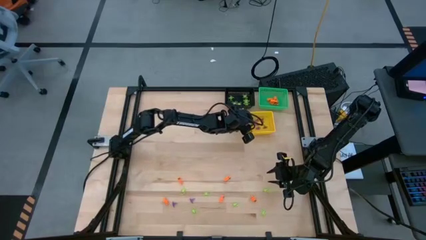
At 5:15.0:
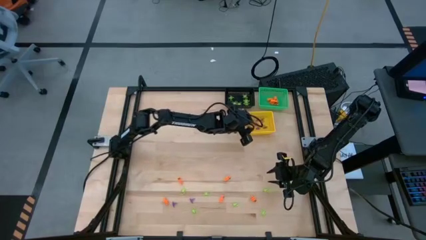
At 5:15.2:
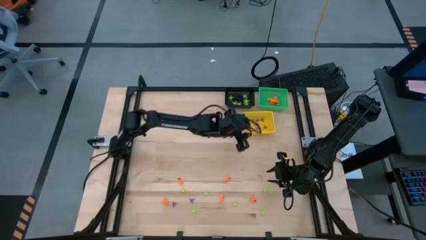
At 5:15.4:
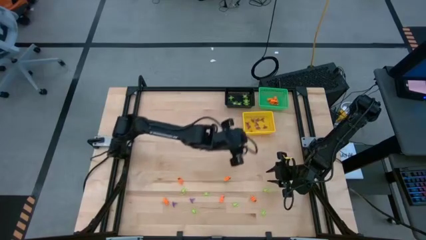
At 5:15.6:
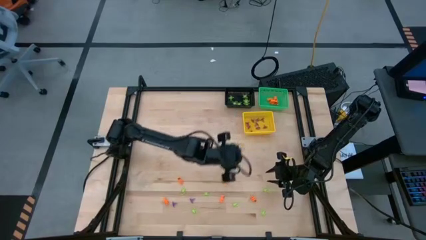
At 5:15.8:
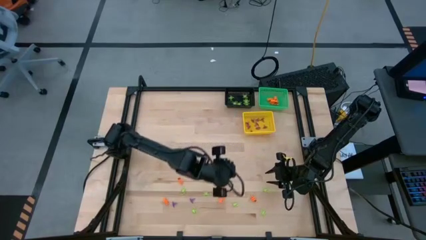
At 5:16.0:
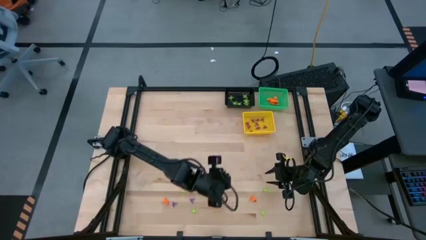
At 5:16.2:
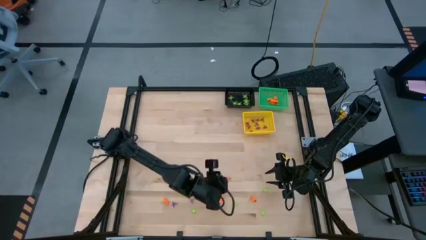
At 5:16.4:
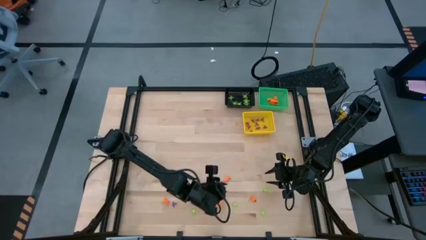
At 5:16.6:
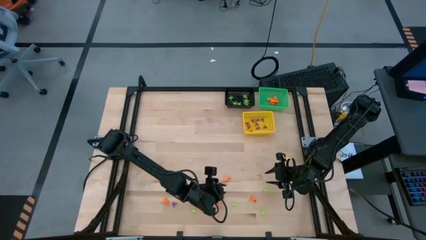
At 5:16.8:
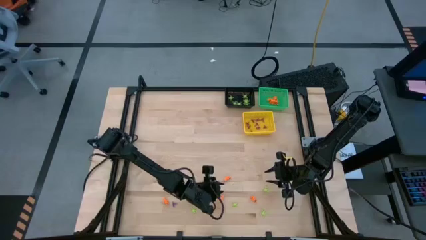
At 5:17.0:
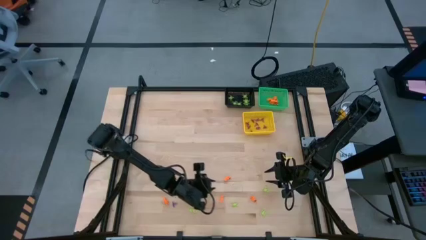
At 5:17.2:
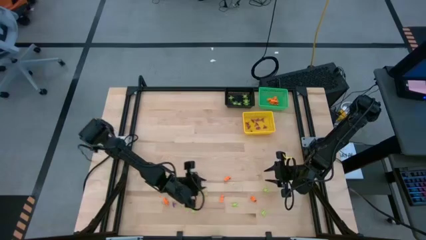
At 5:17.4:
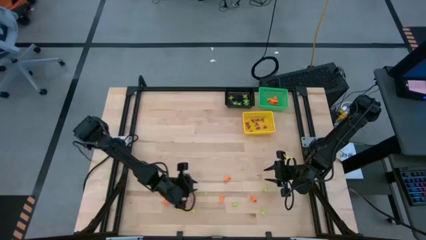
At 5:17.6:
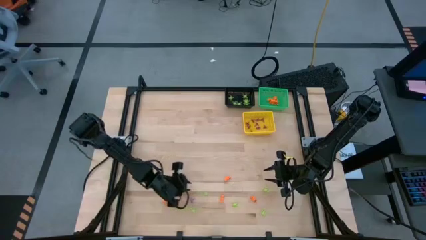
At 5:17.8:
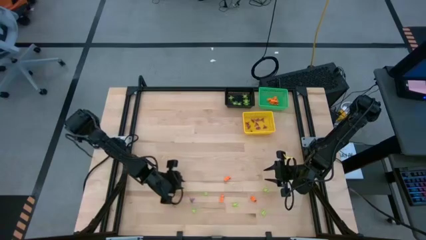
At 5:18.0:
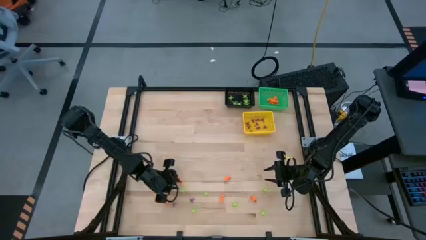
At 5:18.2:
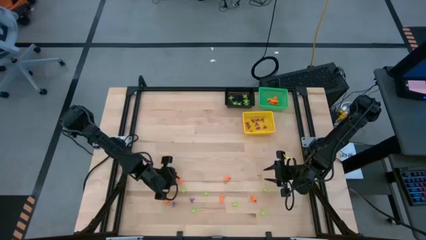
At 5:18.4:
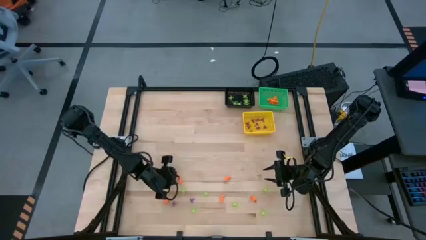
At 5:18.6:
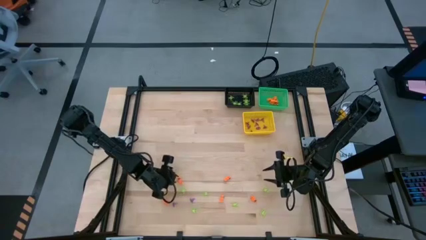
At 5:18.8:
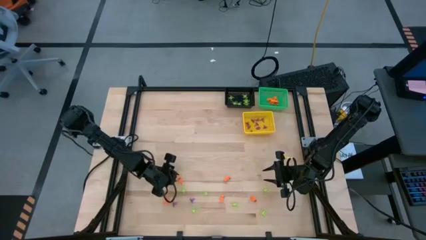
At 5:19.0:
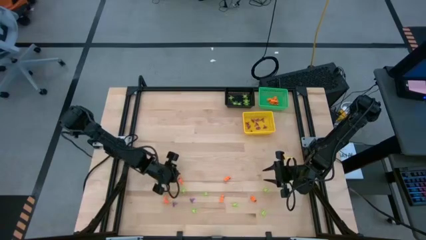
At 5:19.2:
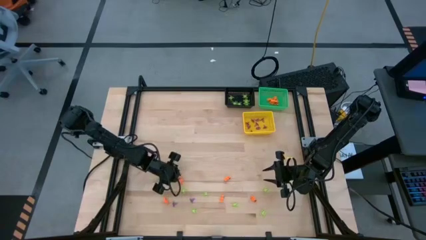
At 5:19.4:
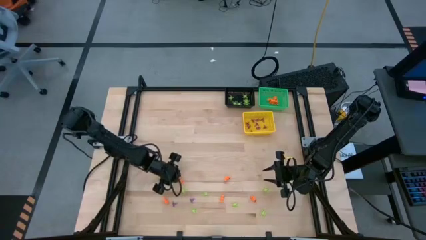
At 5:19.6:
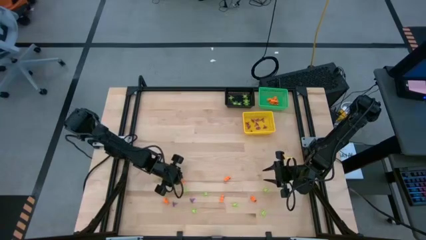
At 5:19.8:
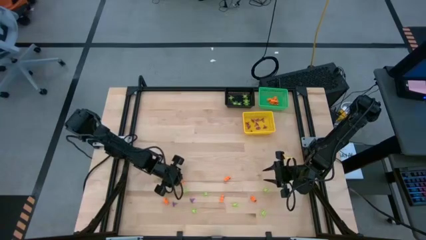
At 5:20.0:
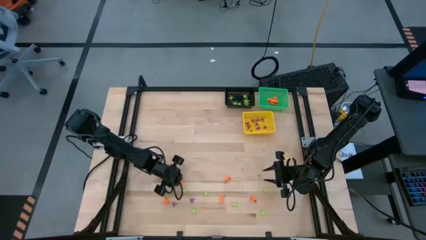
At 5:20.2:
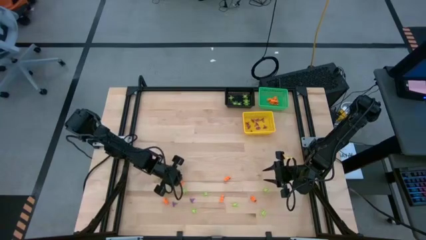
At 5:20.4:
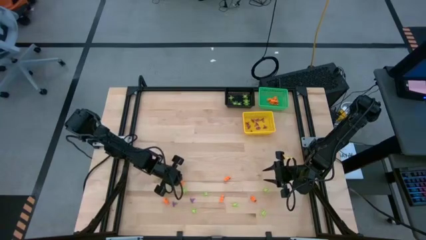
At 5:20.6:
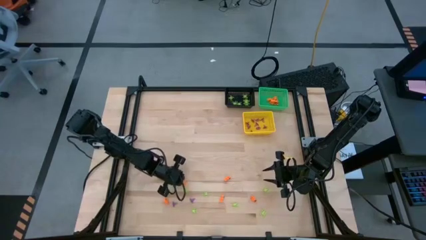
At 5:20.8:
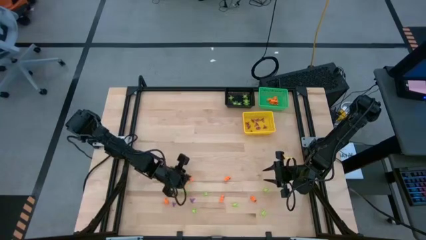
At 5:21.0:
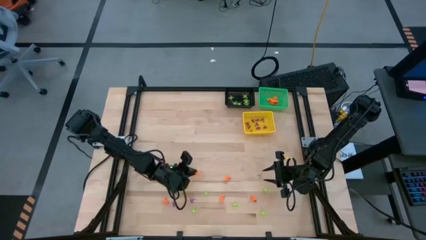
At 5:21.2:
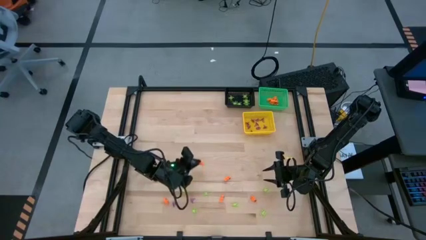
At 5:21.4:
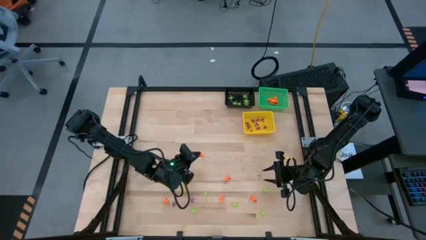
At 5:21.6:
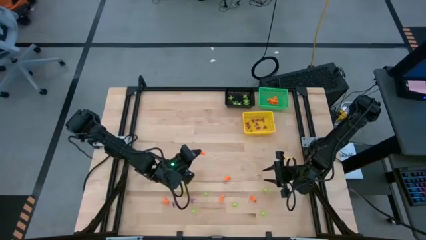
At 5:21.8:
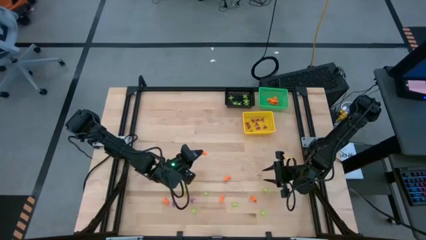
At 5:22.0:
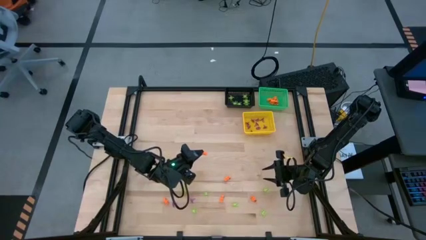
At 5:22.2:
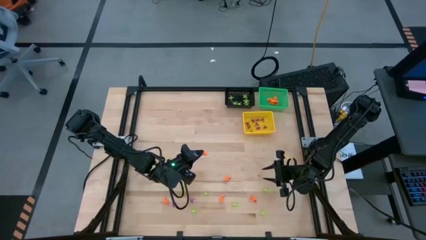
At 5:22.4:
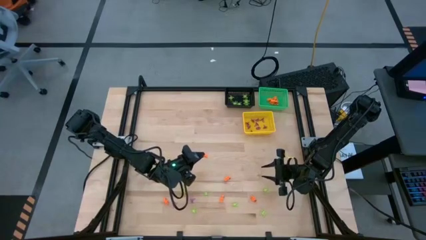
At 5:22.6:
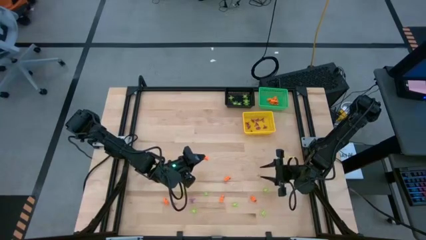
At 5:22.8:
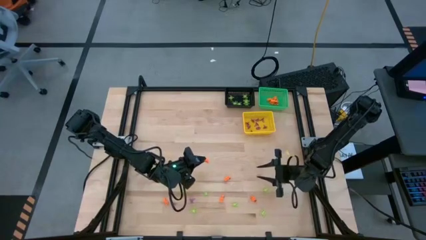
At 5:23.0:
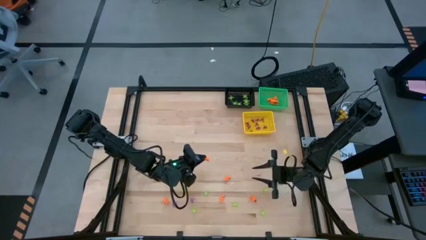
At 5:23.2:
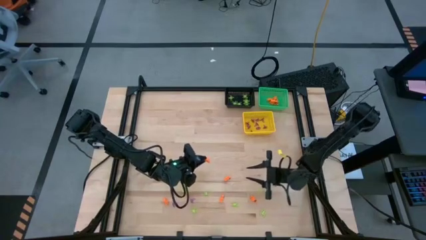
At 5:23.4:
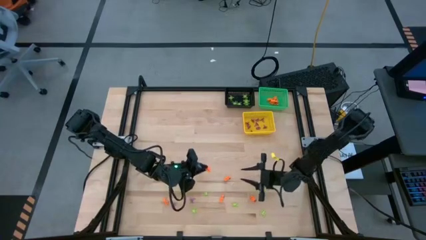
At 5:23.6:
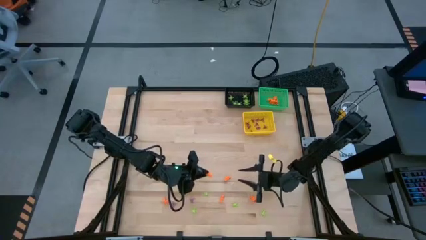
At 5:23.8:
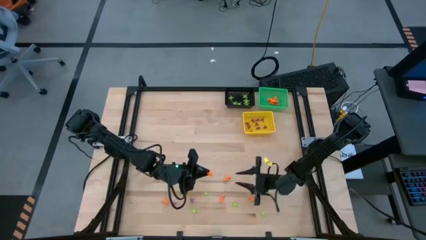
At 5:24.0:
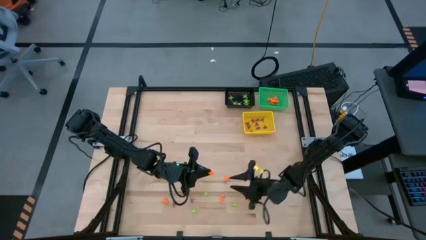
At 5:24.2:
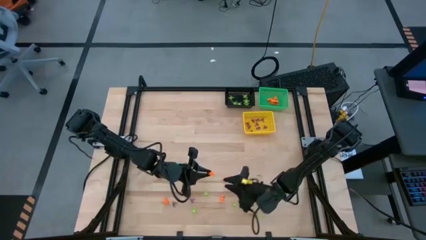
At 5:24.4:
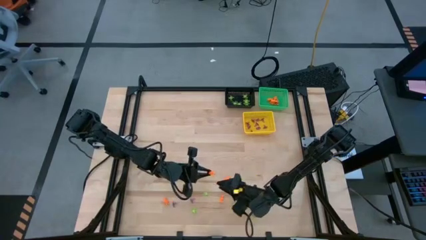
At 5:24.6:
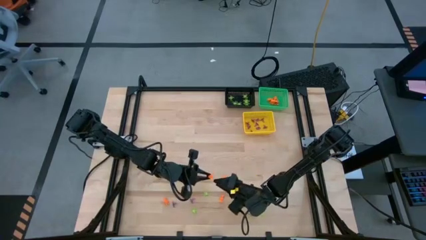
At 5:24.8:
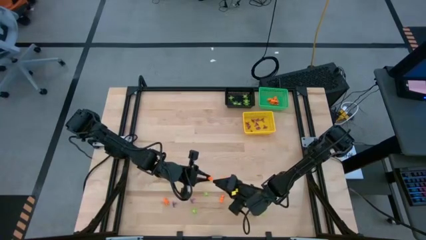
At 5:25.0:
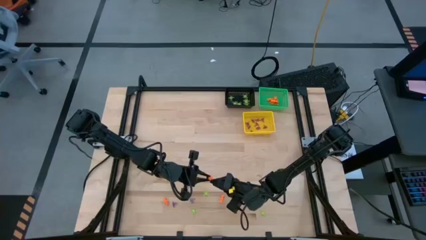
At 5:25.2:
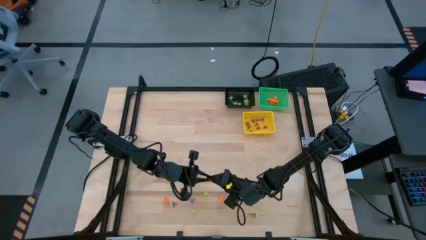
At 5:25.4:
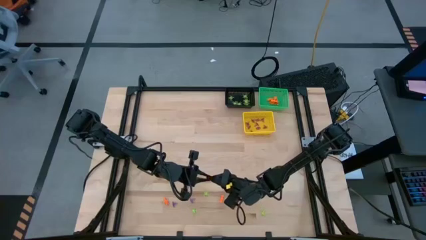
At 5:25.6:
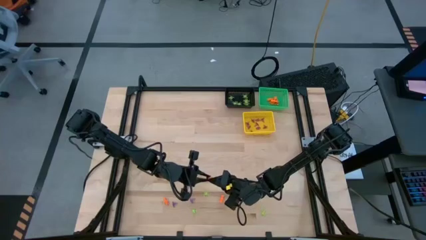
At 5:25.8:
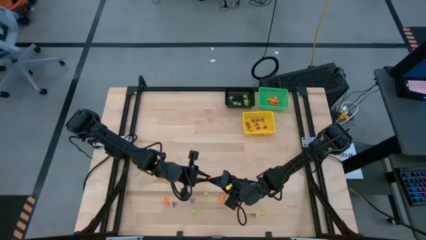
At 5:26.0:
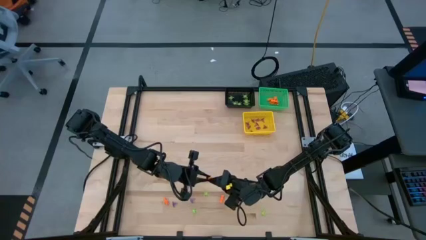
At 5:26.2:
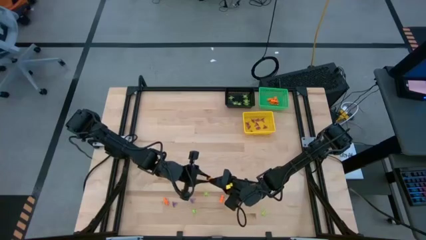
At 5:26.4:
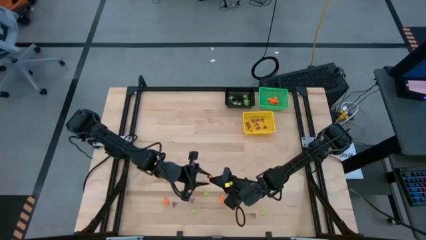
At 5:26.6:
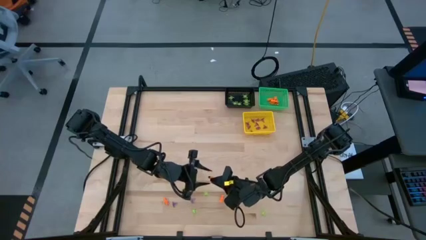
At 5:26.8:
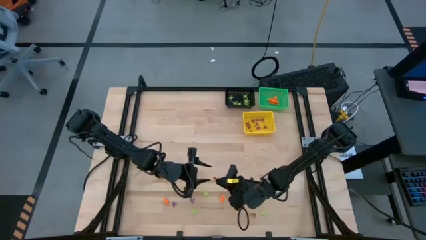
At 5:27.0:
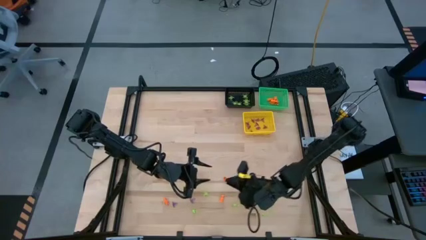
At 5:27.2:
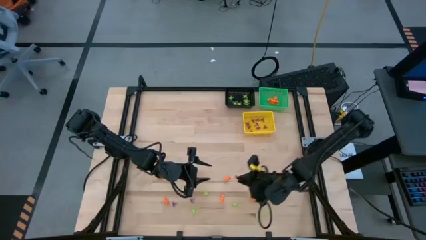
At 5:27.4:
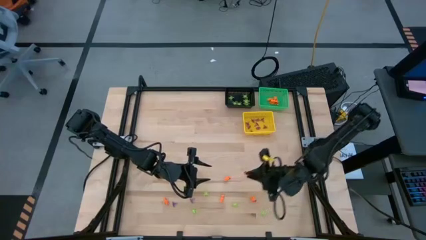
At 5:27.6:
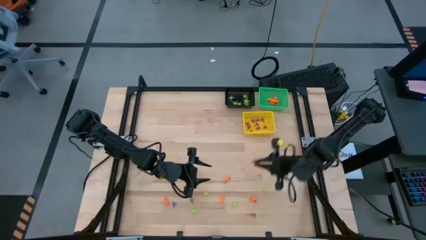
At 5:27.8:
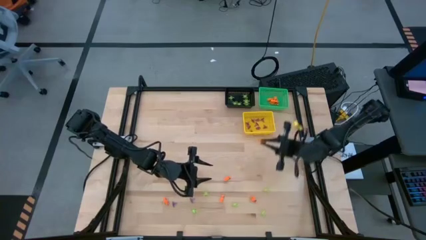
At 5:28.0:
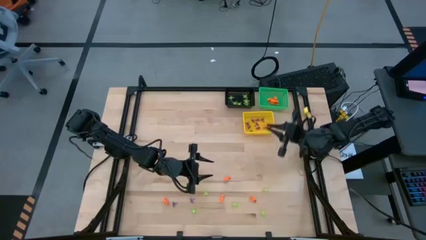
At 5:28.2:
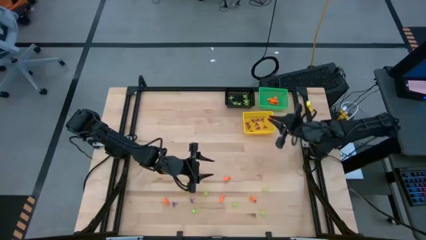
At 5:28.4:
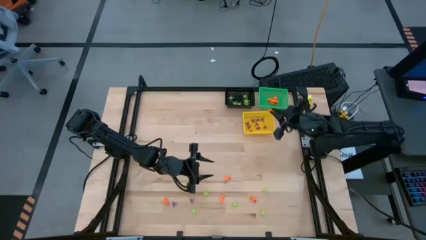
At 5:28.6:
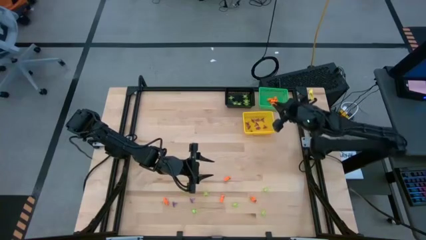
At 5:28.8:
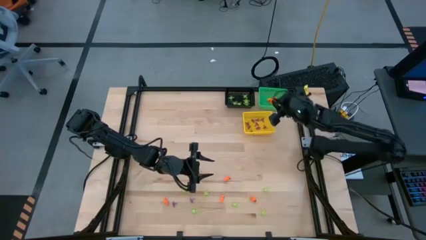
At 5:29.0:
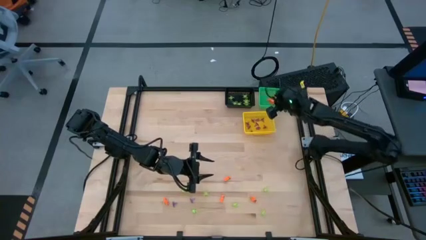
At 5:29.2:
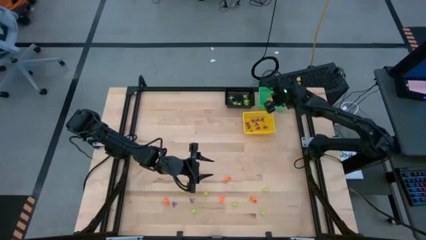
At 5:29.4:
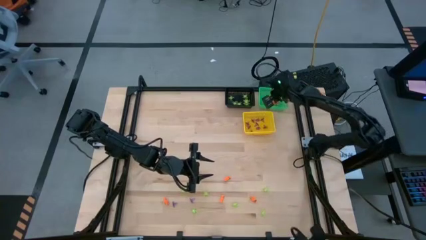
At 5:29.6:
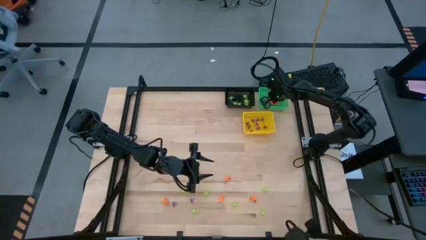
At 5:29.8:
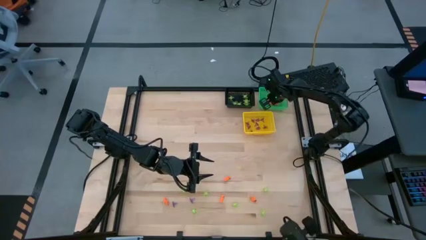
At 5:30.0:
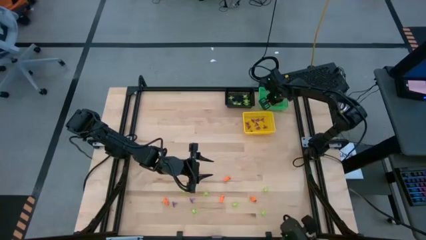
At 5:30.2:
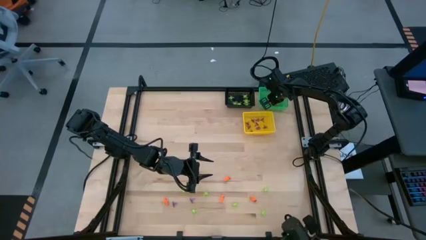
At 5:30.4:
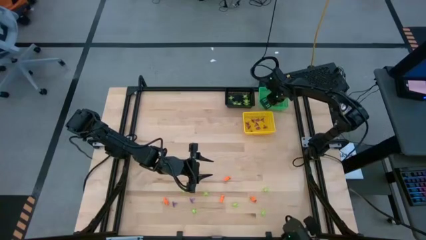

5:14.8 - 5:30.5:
Task: Sort Halloween decoration
Put the orange skeleton toy into the green basket

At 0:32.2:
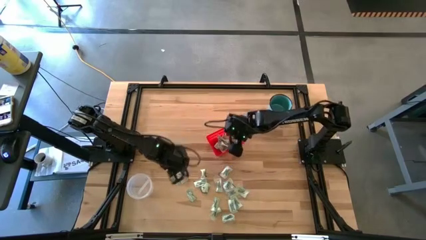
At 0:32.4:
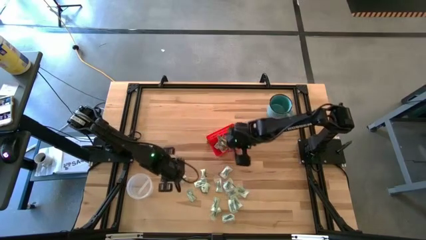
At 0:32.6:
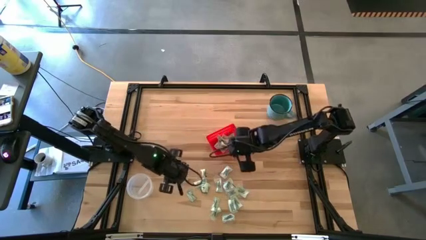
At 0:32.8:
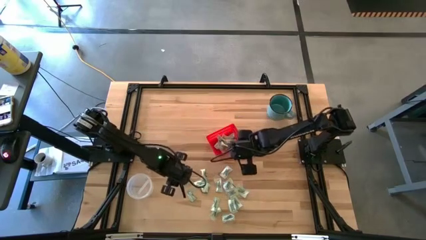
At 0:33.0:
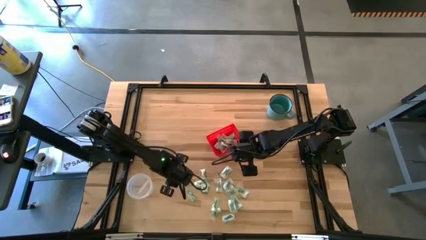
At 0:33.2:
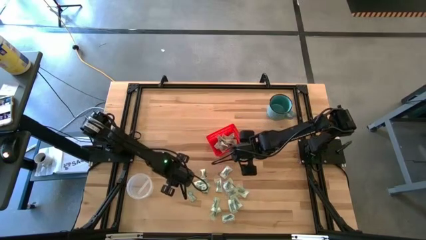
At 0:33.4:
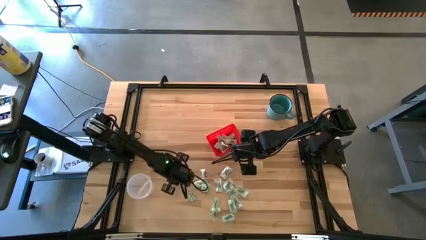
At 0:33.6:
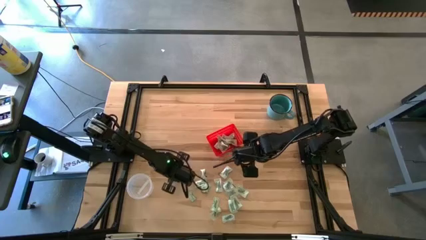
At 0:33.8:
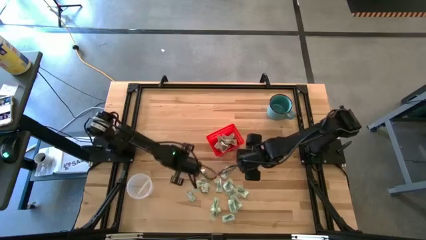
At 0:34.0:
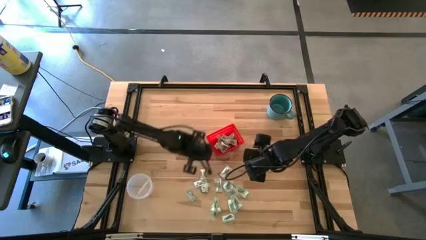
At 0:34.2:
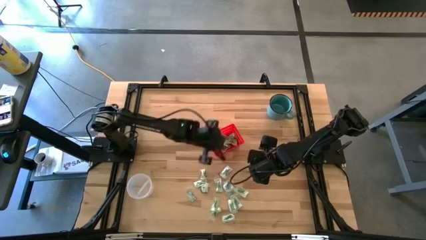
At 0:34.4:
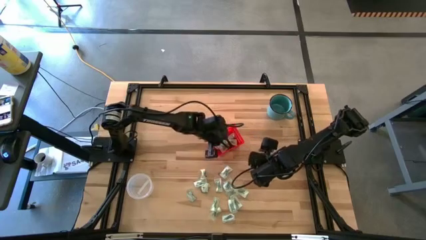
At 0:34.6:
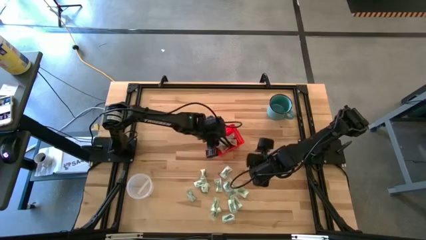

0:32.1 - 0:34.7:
Task: Pick and place items into bin
Put the stevia packet into the red bin
